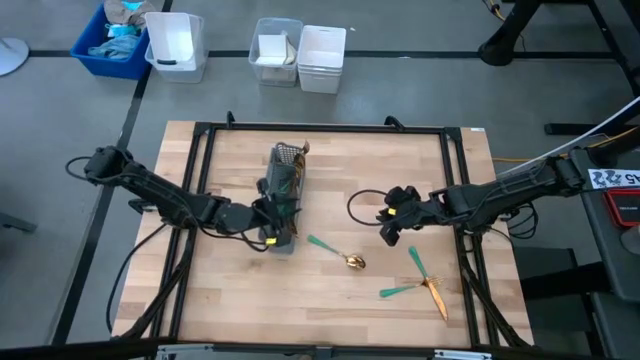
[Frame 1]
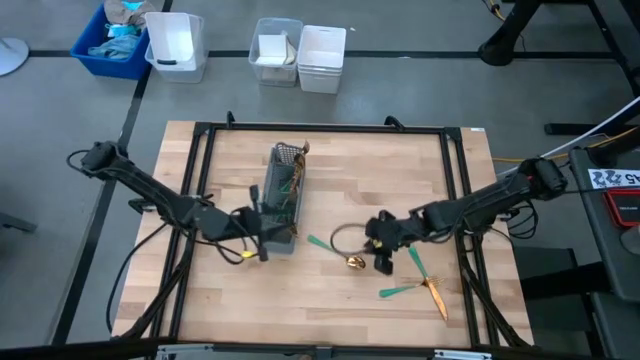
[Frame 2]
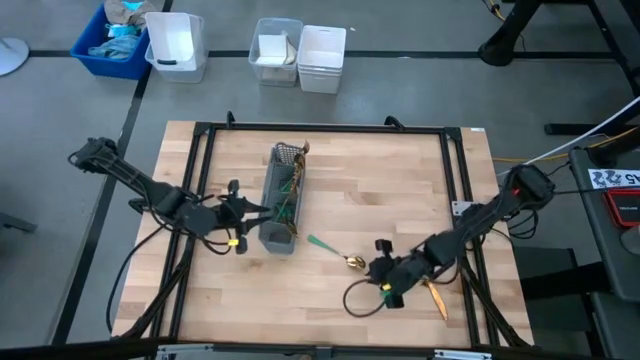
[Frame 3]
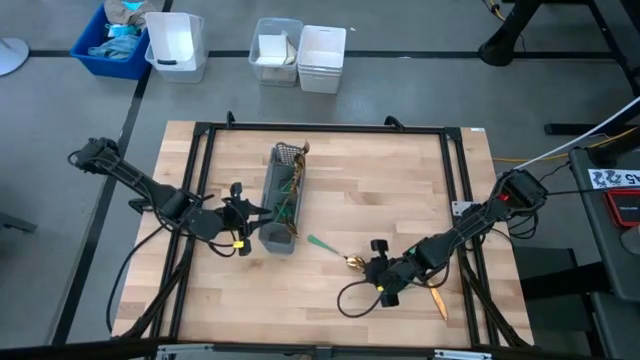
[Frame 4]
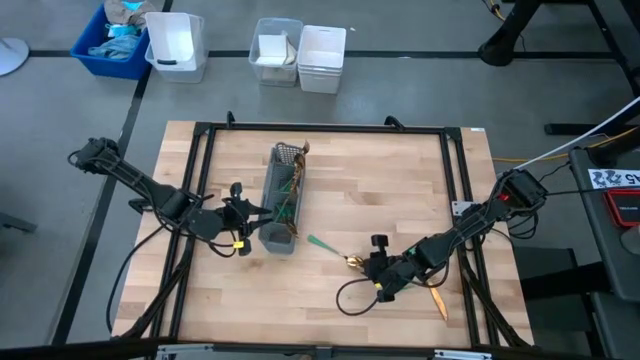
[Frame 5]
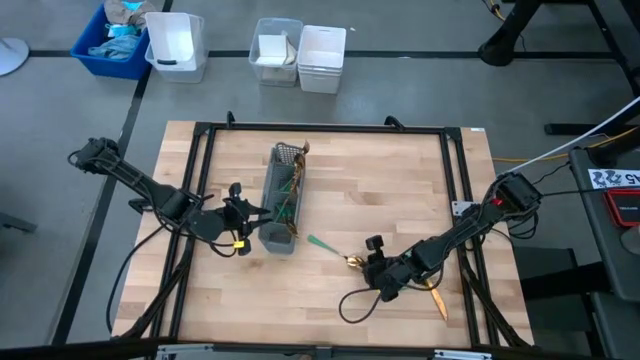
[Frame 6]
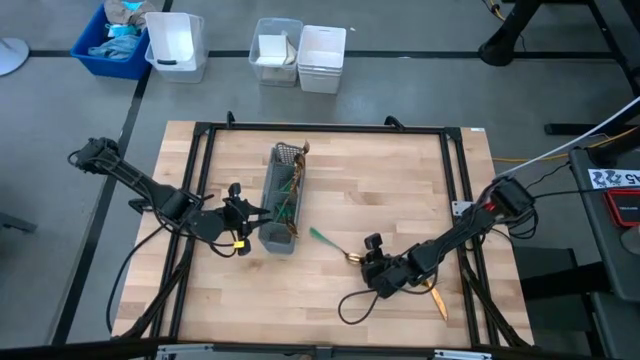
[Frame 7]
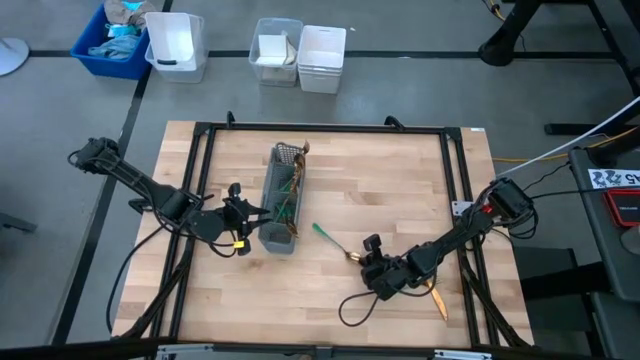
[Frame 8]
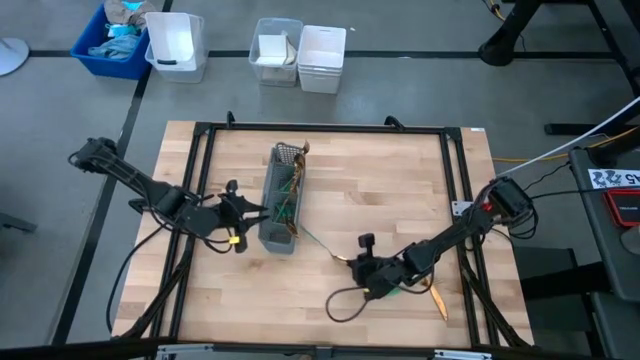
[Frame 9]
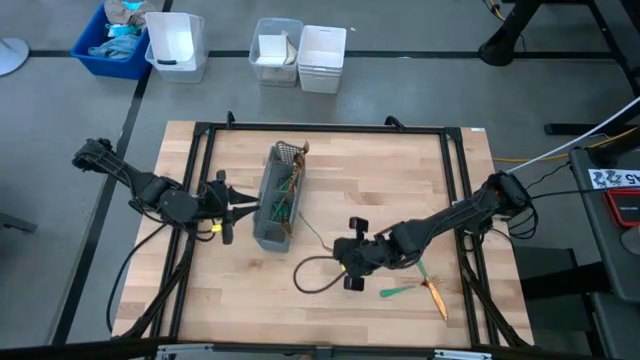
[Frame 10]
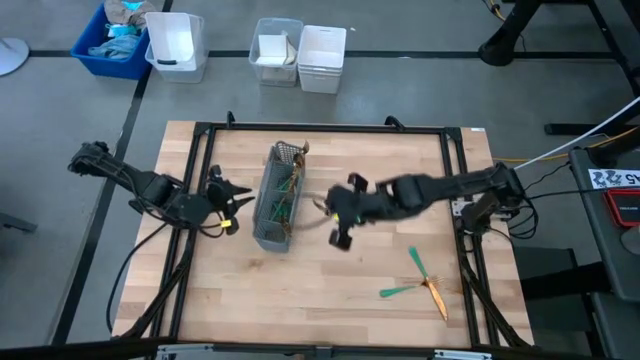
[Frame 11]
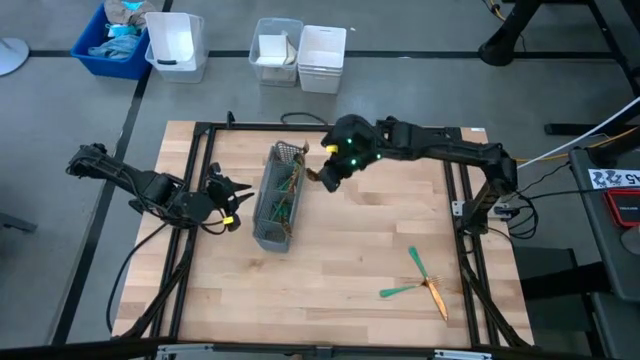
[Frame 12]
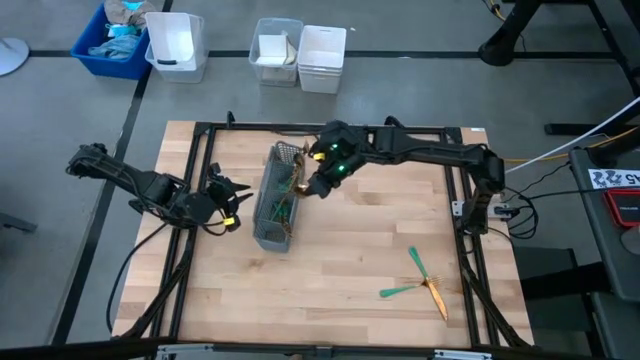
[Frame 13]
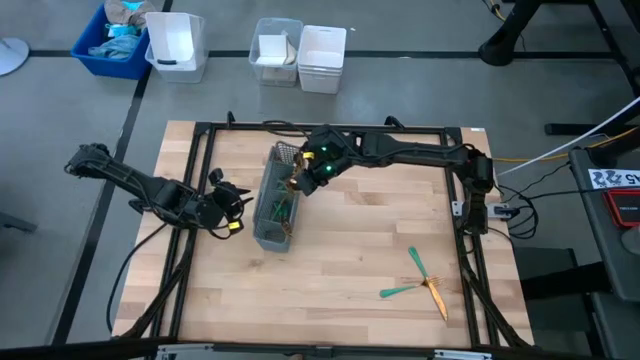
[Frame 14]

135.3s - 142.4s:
Task: Sort silverware
Put the green spoon into the gray silverware rack

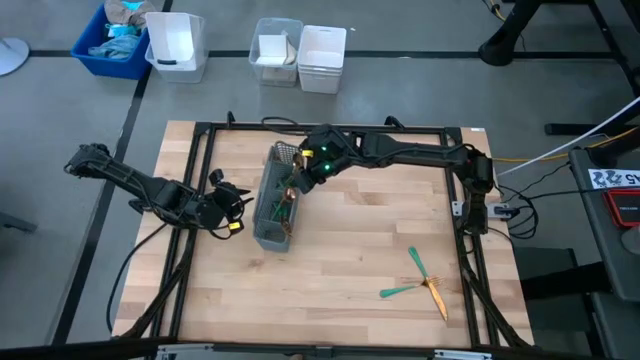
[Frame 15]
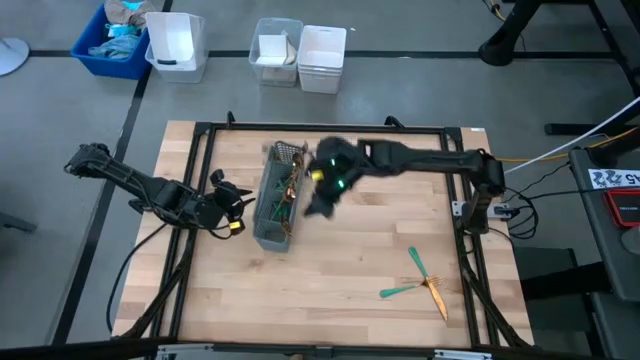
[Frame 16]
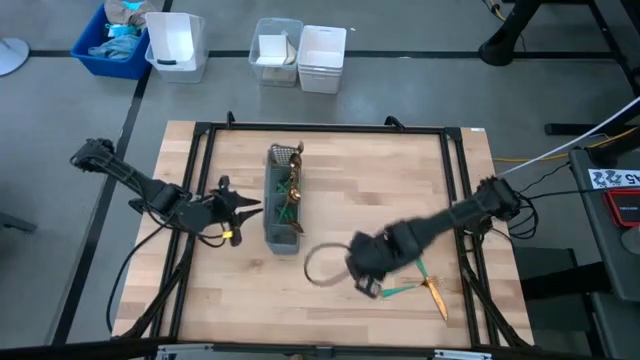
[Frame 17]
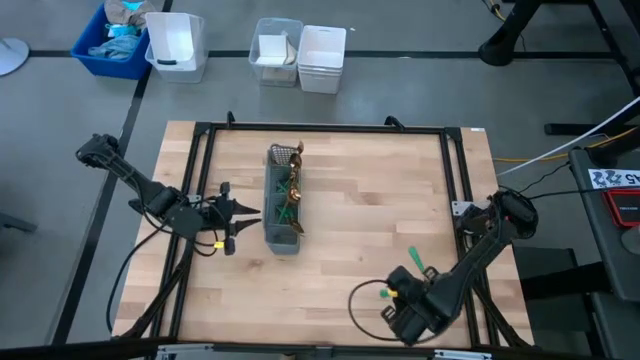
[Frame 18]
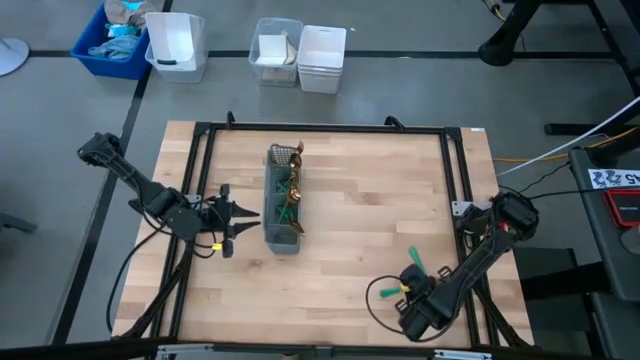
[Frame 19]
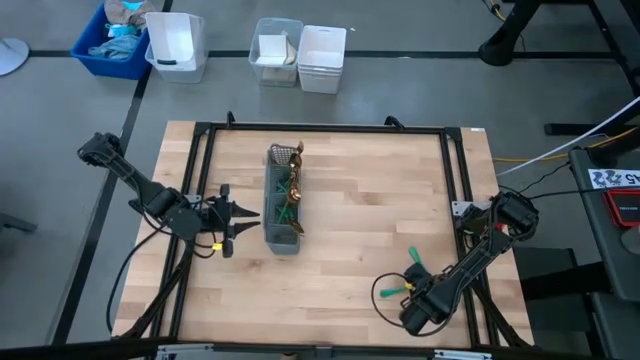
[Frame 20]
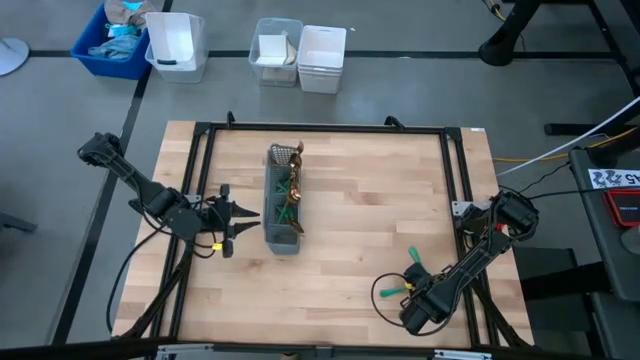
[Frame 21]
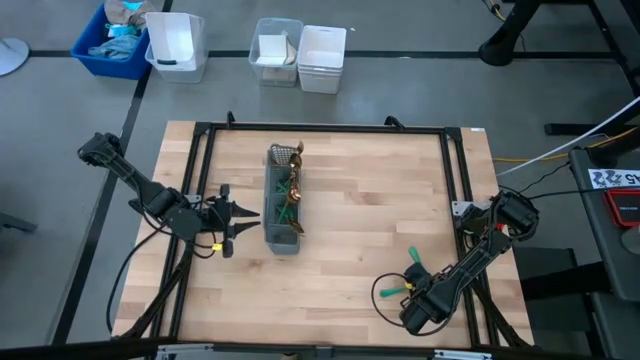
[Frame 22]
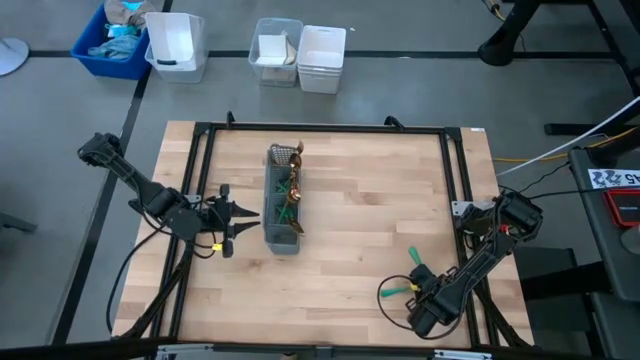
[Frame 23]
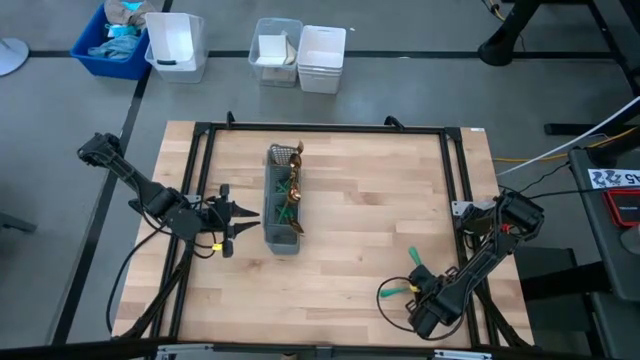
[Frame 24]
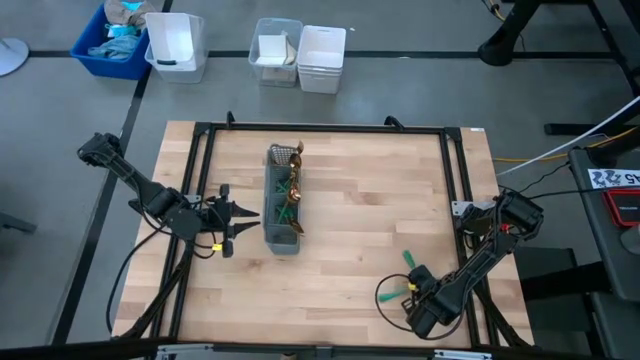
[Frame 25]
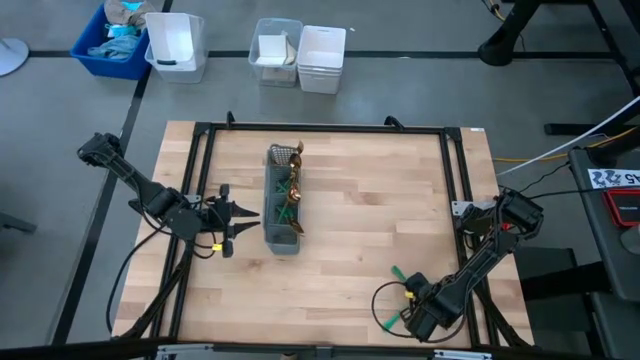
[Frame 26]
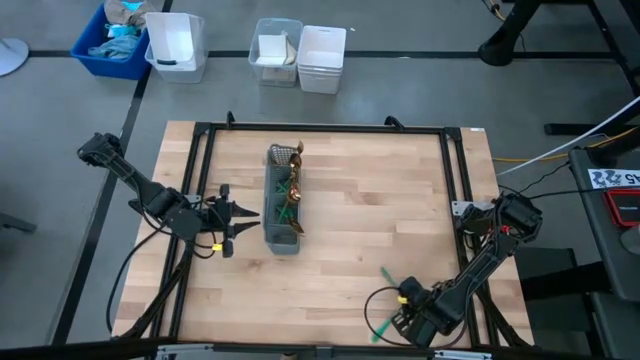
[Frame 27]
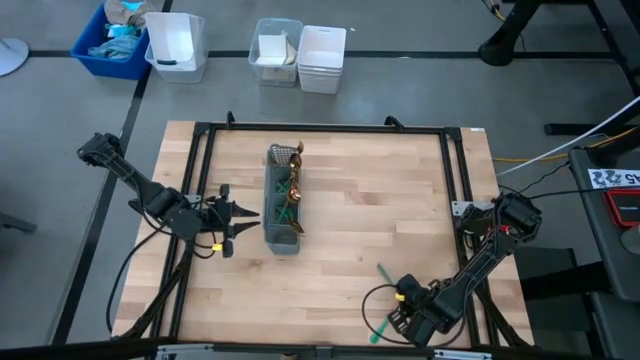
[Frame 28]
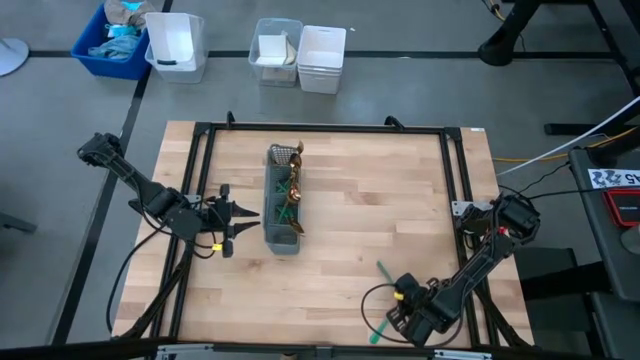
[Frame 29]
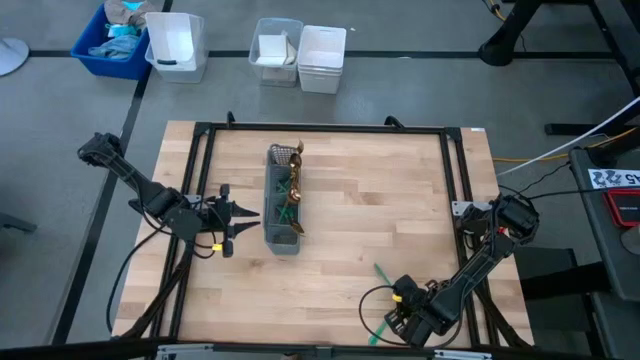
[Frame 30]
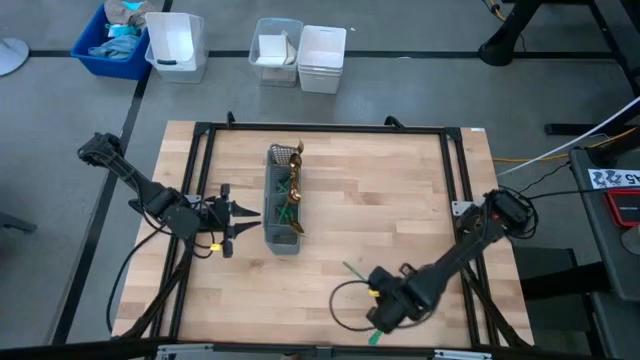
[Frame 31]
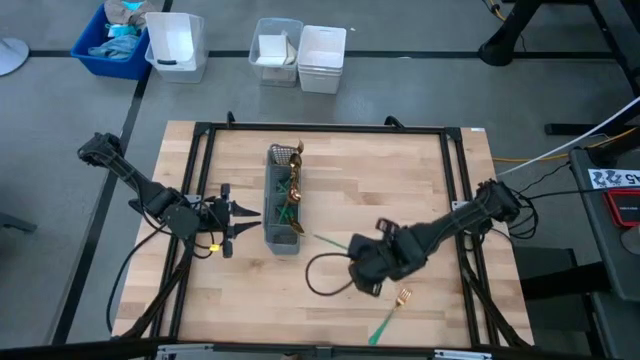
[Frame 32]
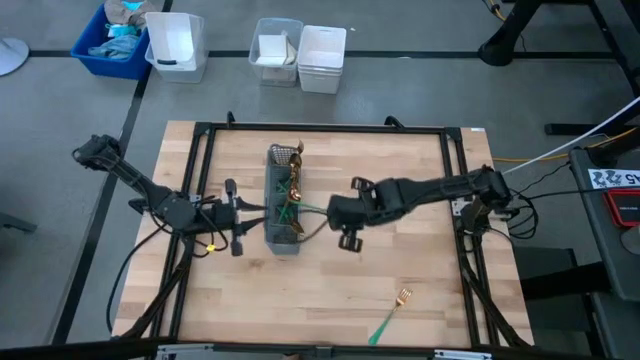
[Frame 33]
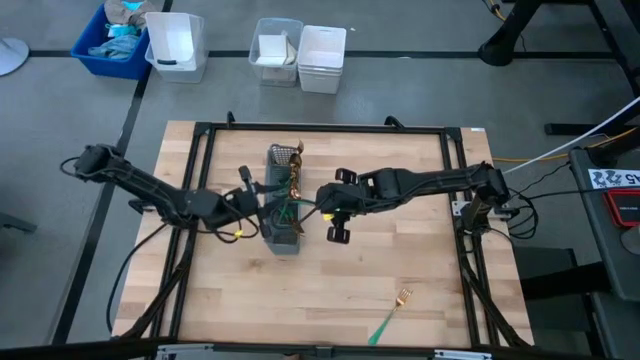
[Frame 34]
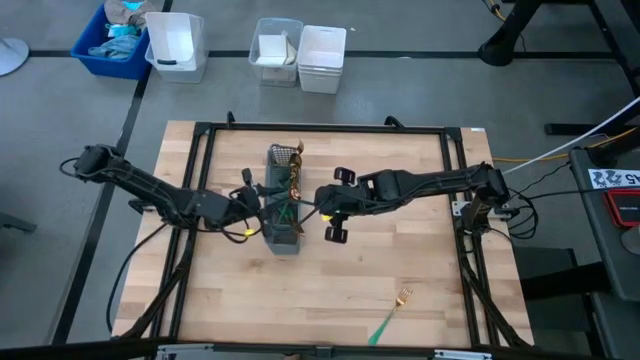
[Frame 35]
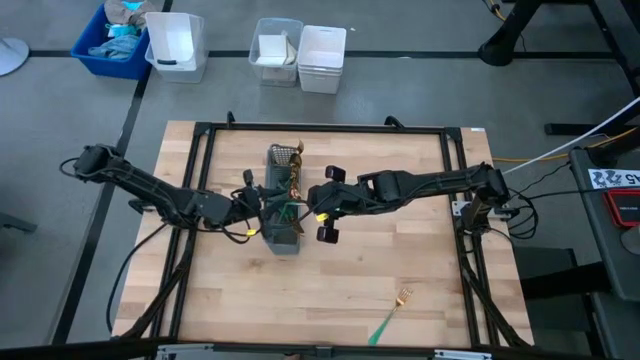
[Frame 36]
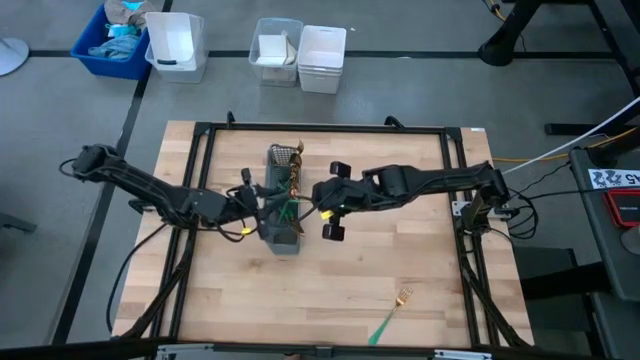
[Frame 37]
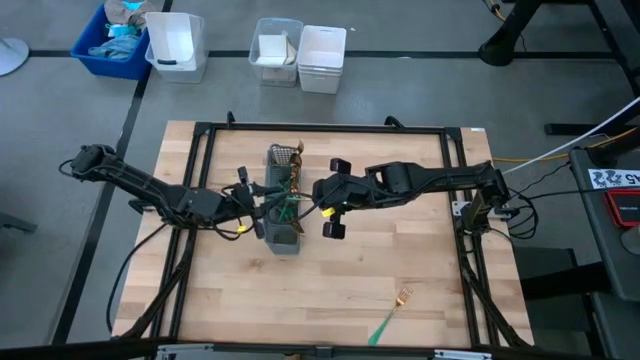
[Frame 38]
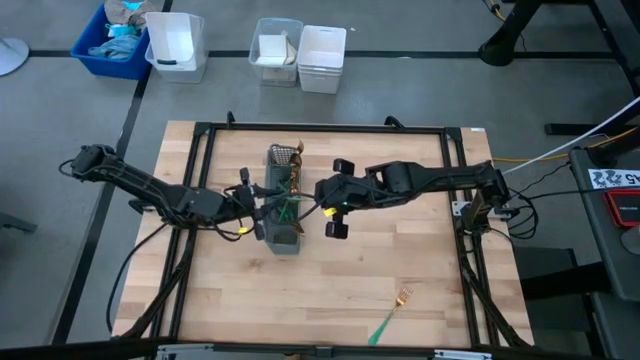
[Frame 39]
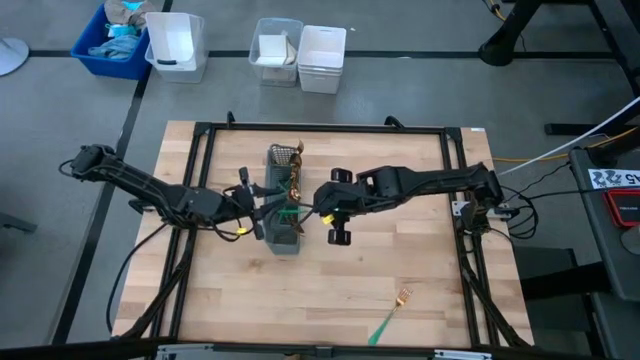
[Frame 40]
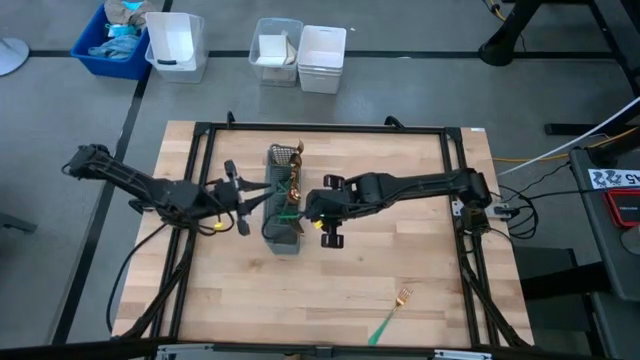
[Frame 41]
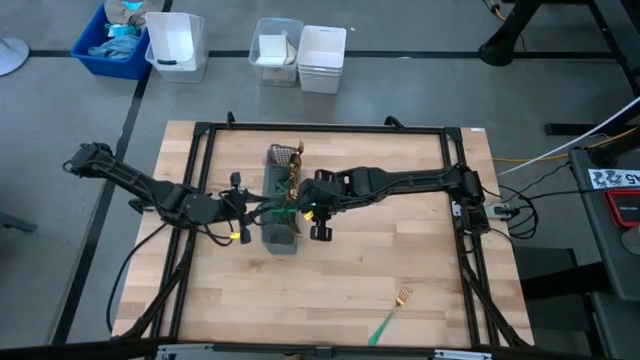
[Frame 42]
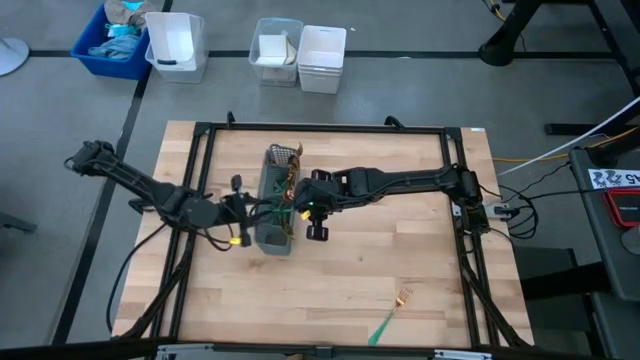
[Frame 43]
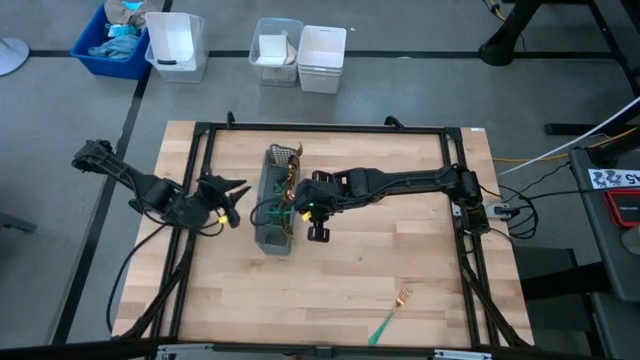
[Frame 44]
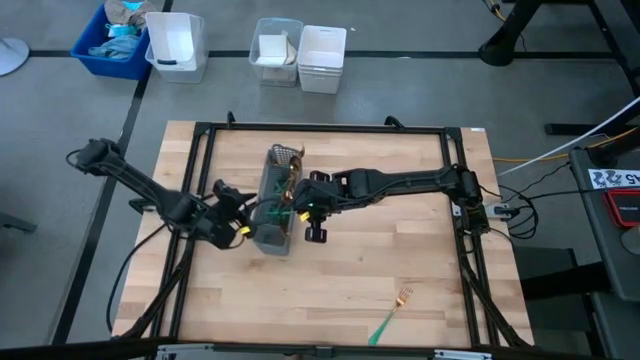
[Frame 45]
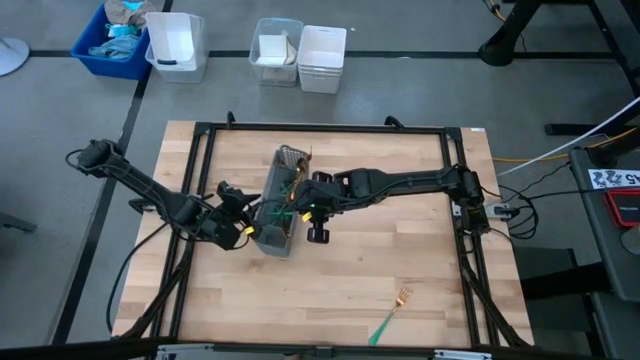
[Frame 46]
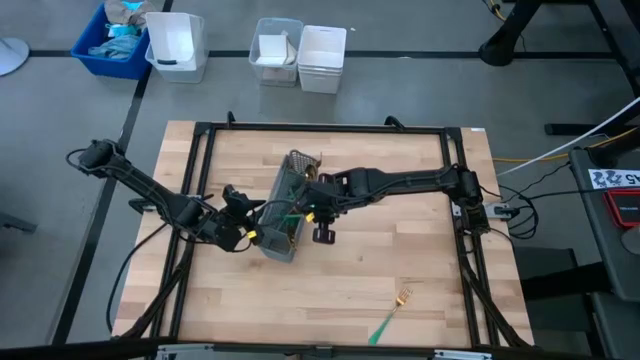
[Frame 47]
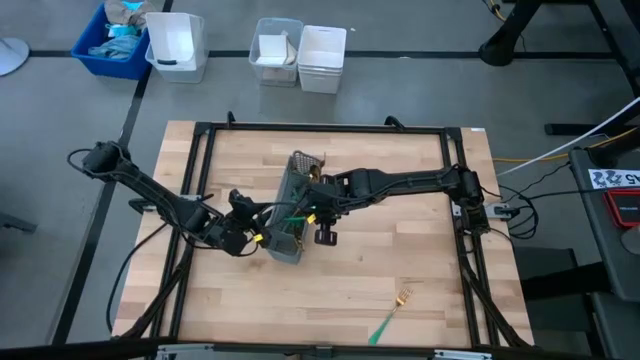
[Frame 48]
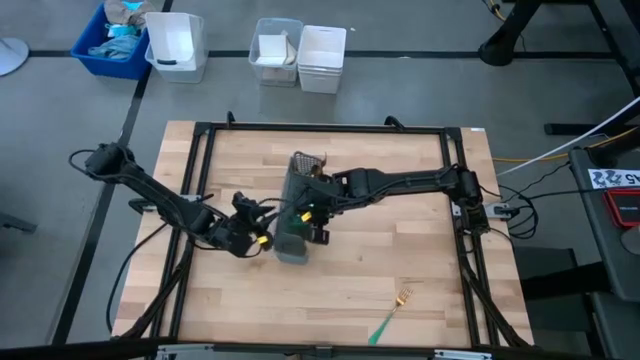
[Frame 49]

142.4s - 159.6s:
Put the green table knife into the gray silverware rack
